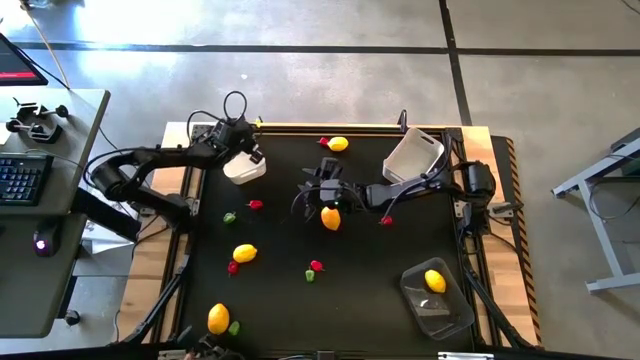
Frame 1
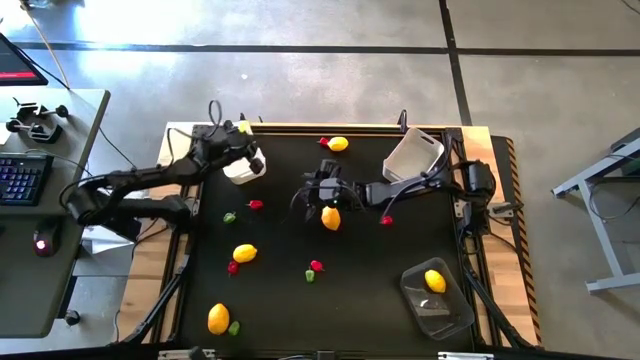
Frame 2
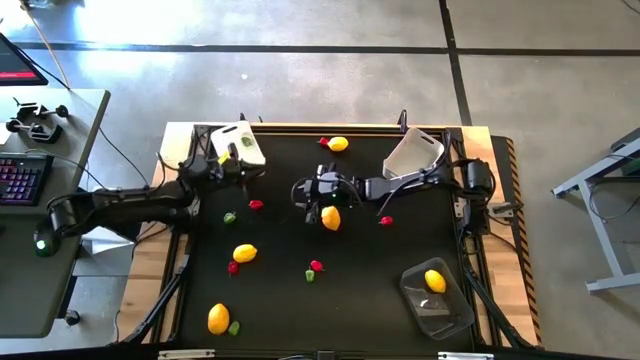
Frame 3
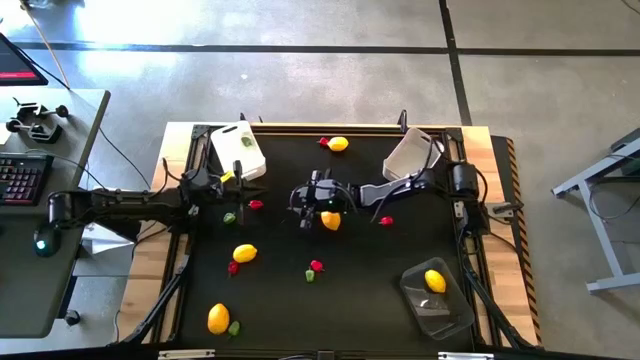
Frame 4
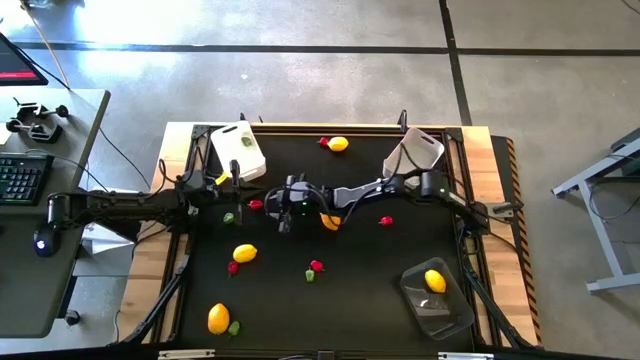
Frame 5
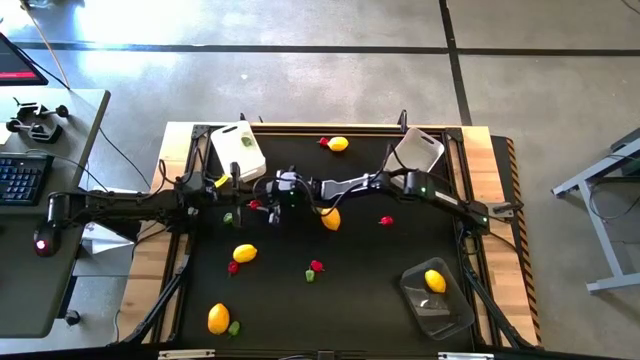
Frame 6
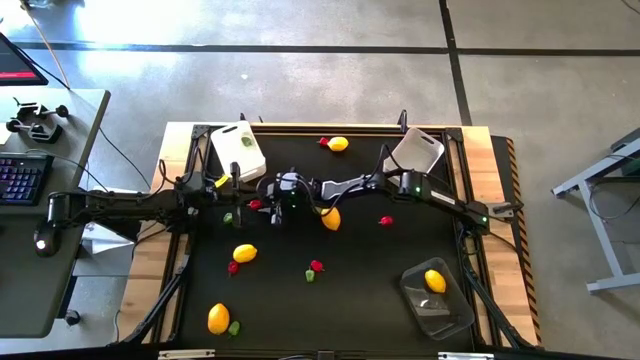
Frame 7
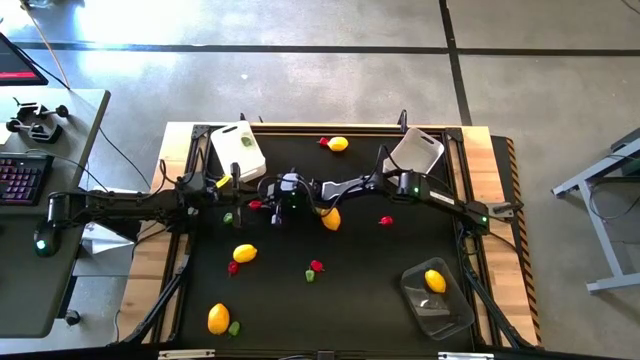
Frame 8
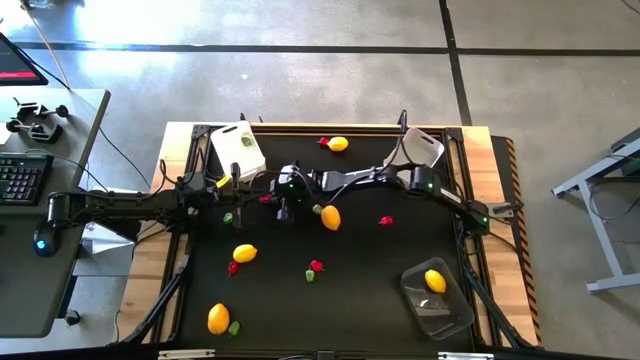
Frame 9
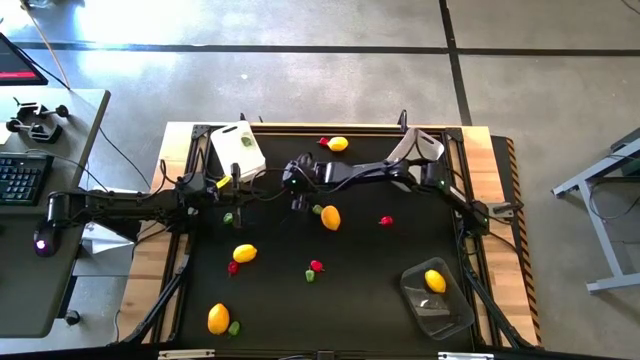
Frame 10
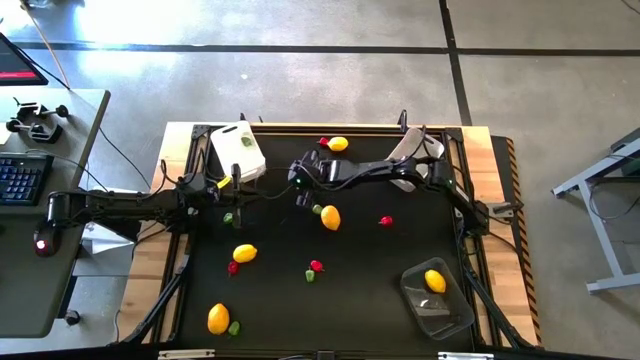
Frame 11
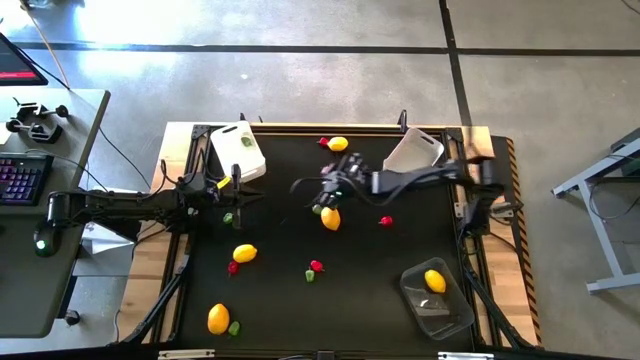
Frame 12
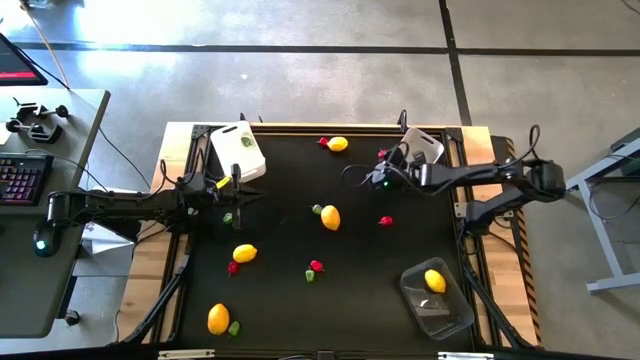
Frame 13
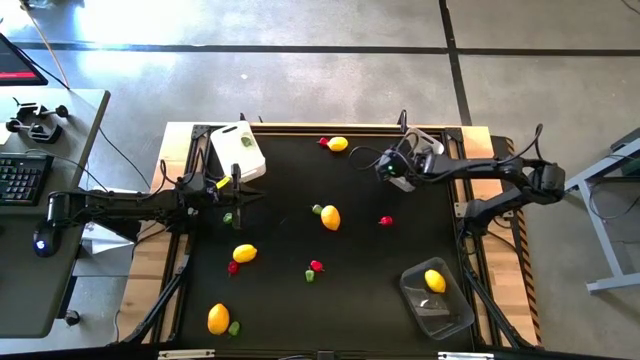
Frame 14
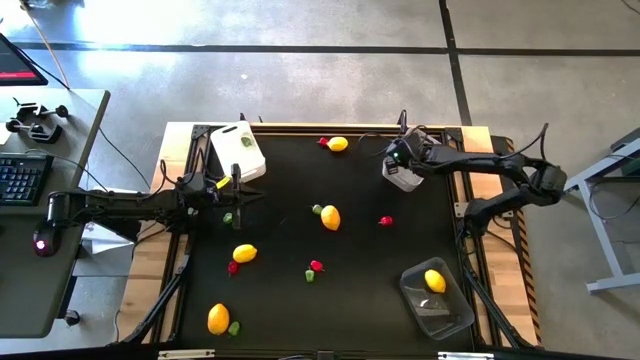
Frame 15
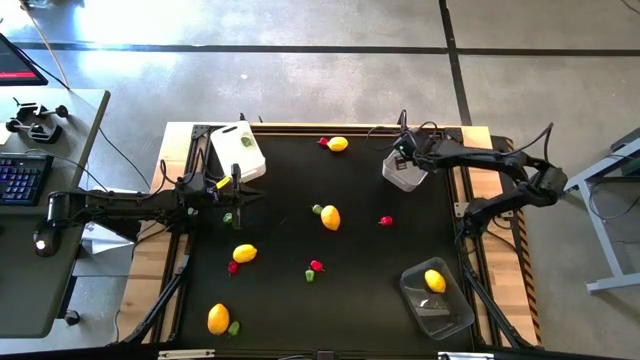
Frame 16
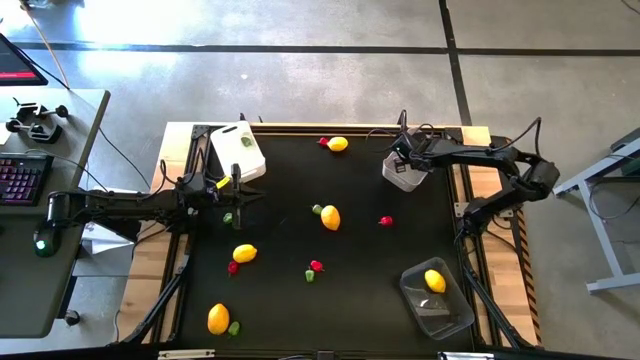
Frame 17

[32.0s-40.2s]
Task: Sort produce into baskets
Put the red chili pepper into the gray bin

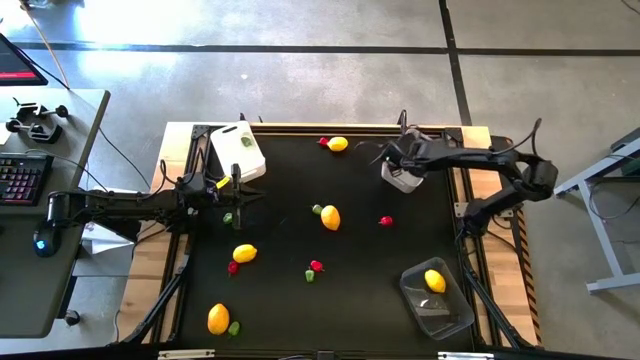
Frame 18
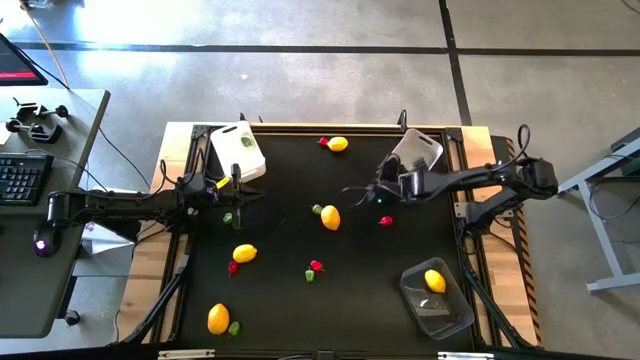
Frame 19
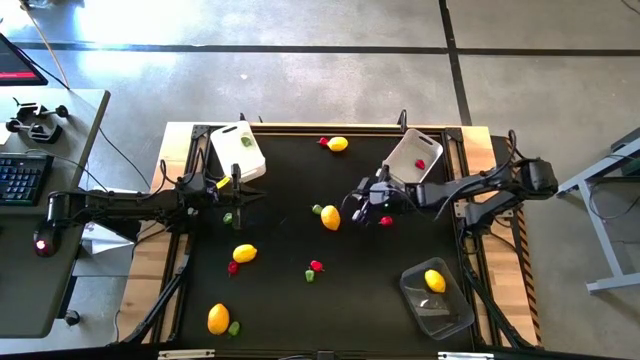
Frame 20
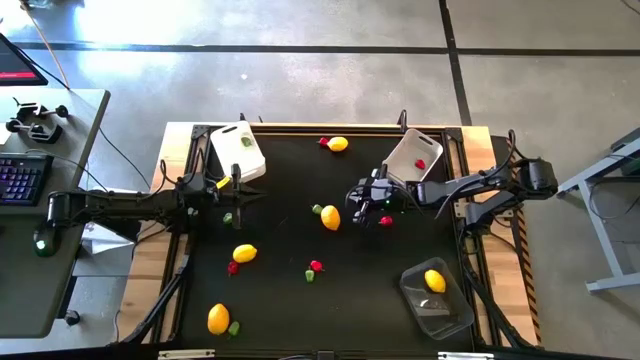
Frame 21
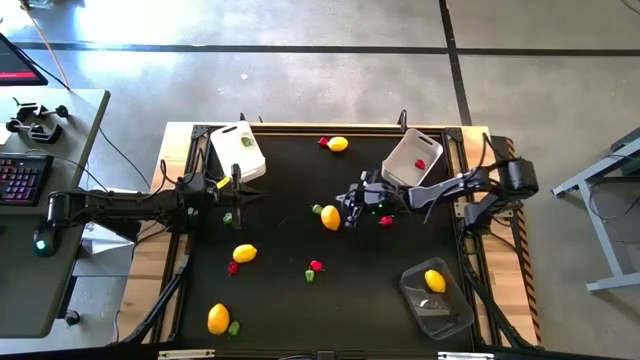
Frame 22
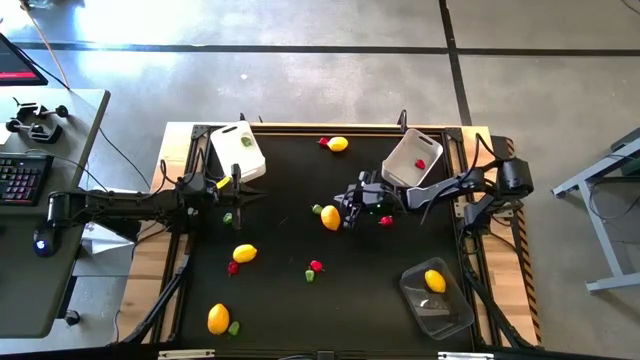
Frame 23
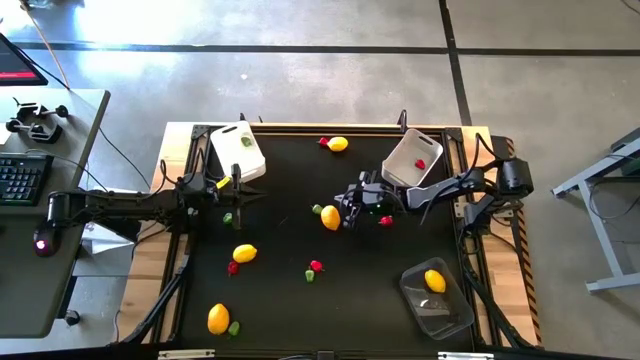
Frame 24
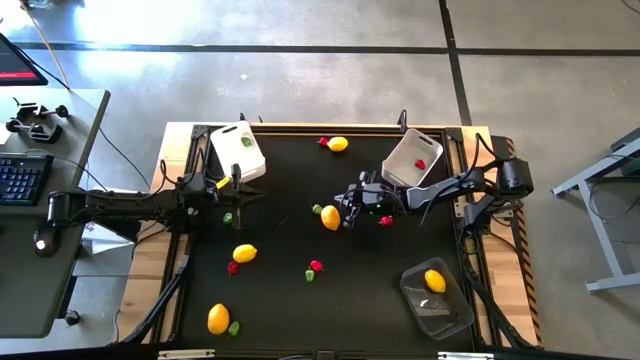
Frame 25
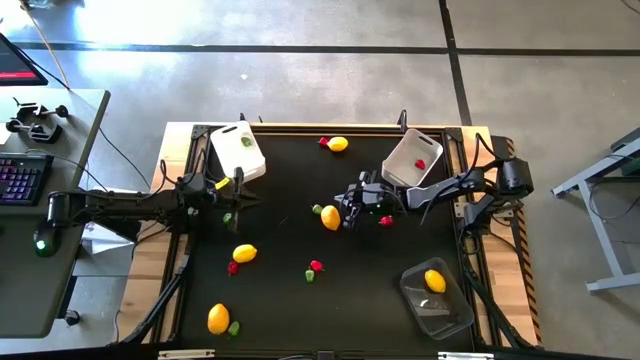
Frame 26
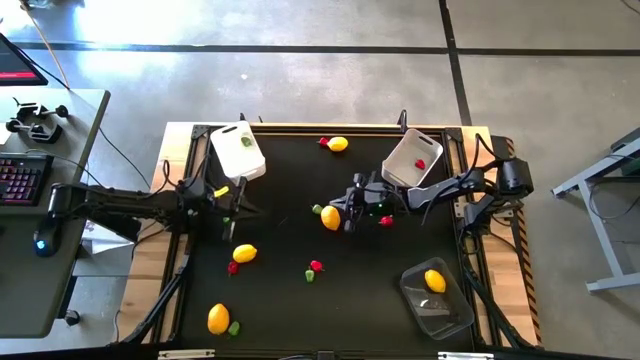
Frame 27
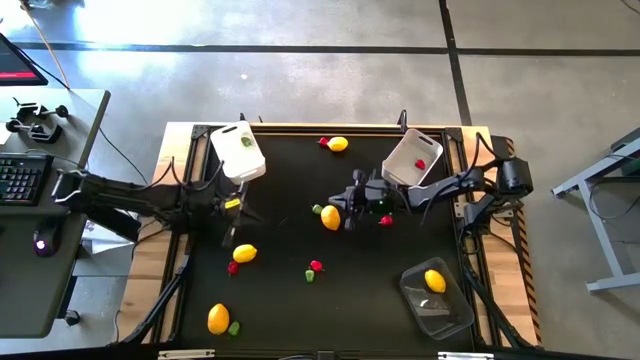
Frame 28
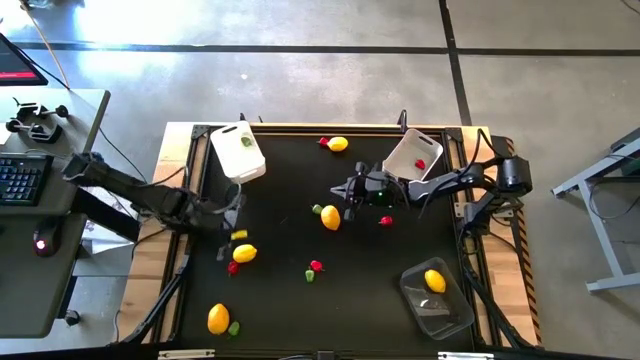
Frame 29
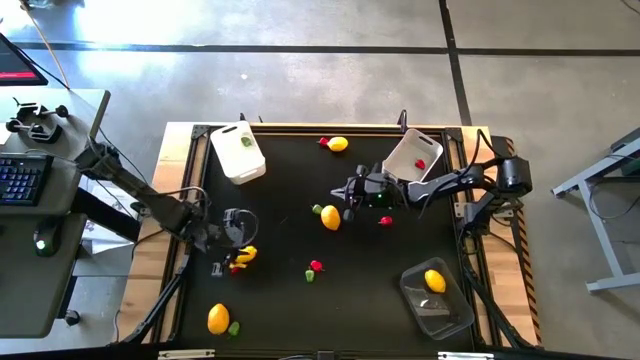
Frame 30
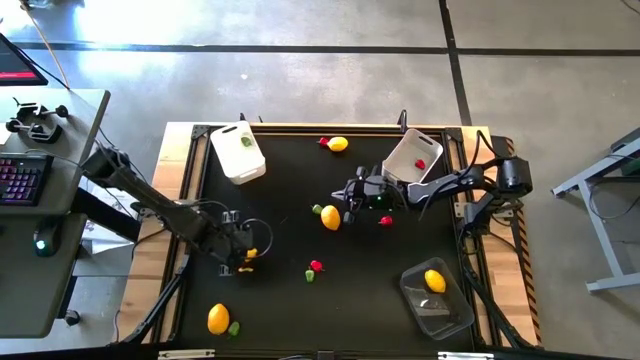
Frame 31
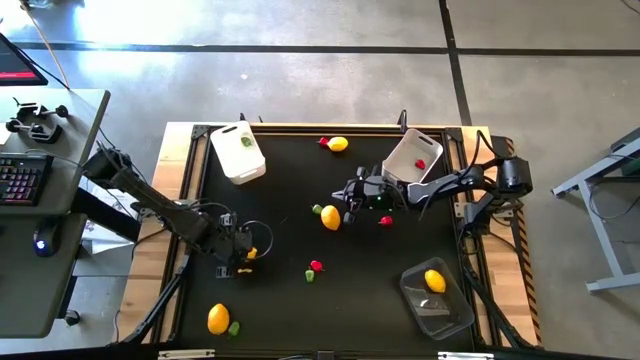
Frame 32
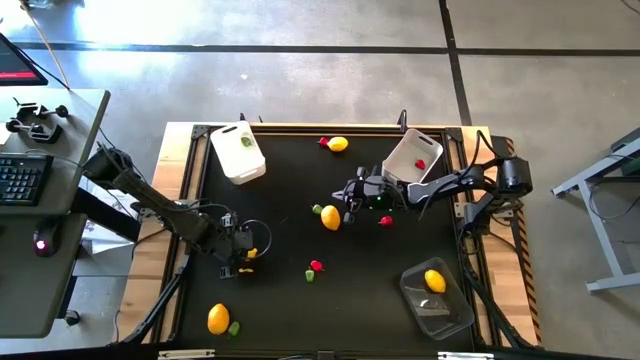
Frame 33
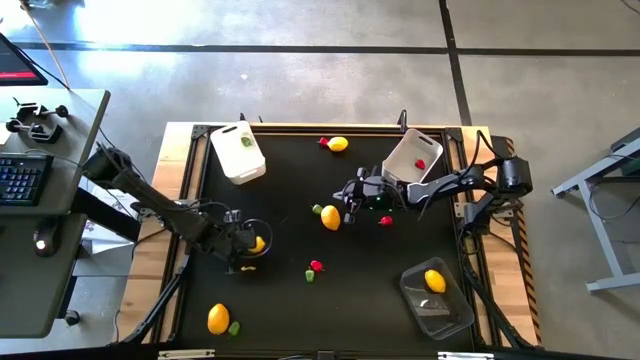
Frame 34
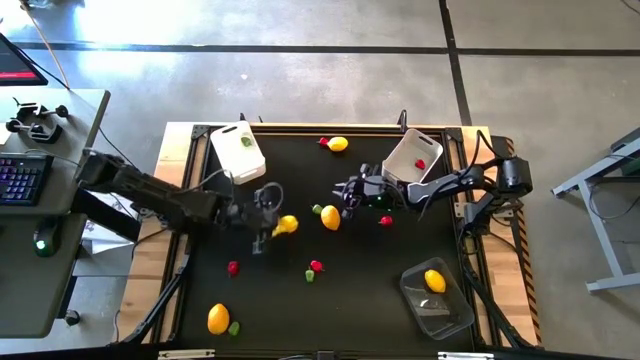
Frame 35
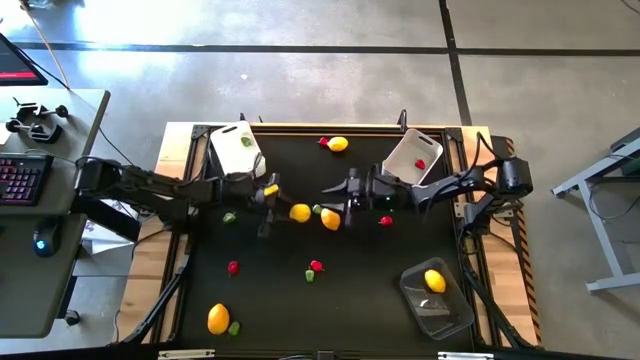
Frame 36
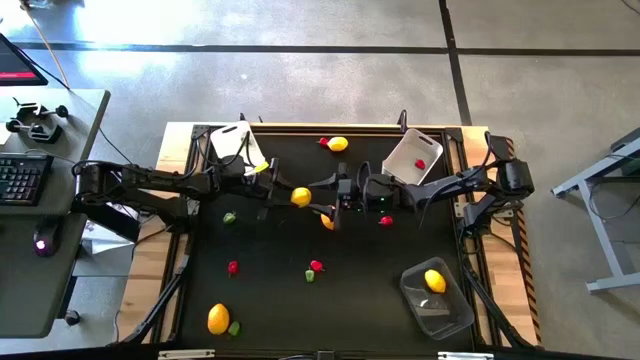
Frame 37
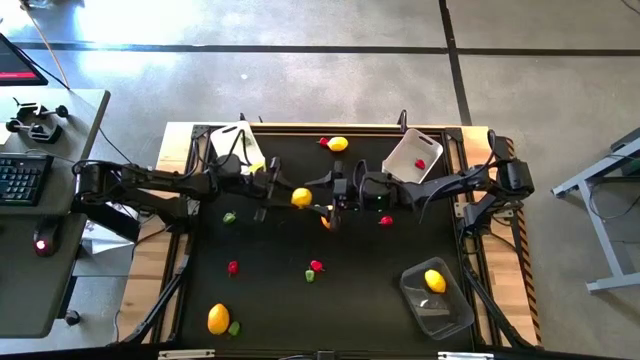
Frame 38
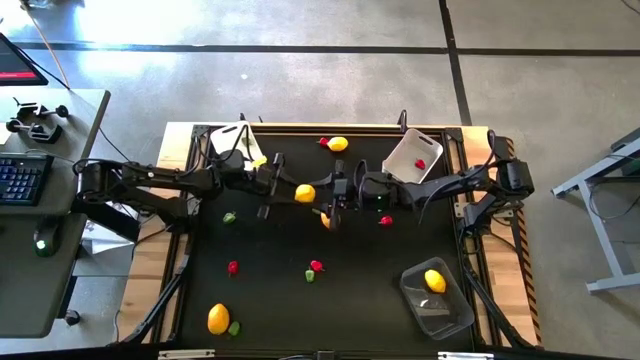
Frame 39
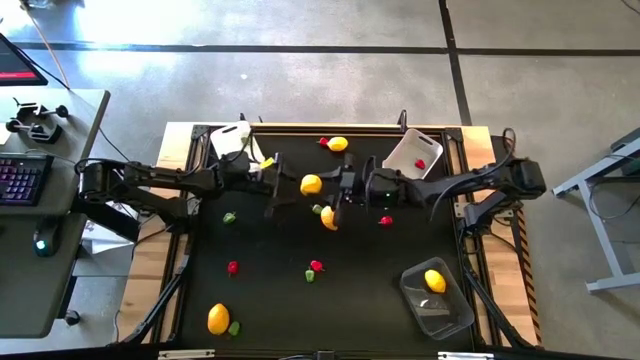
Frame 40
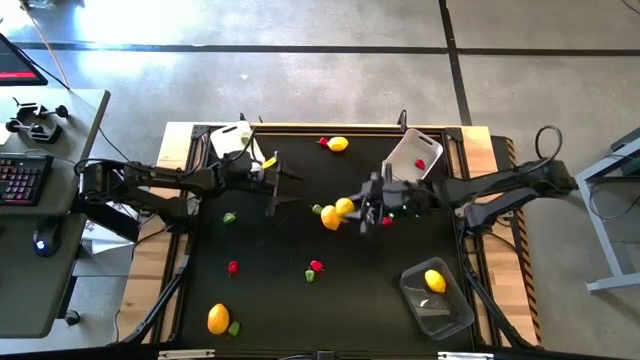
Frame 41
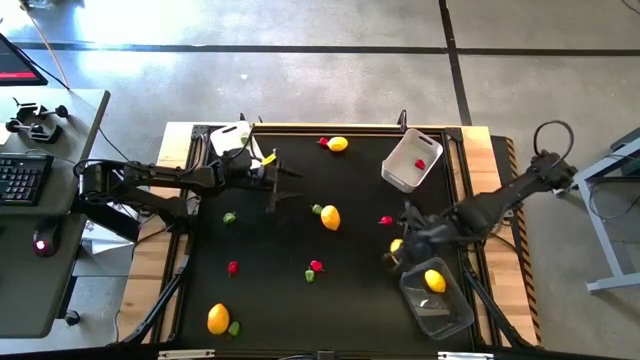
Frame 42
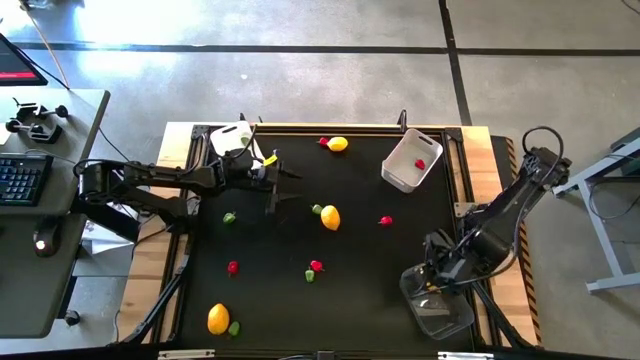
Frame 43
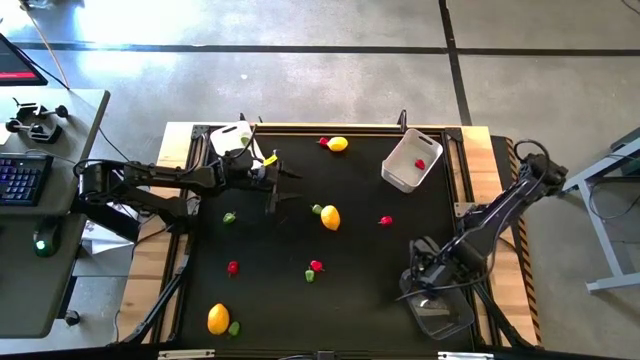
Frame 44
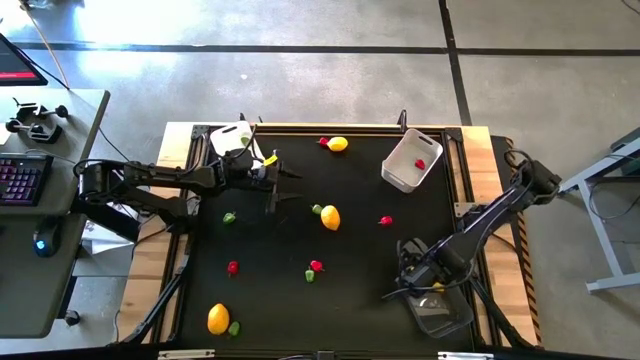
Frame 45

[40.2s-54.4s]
Put the yellow lemon into the transparent bin

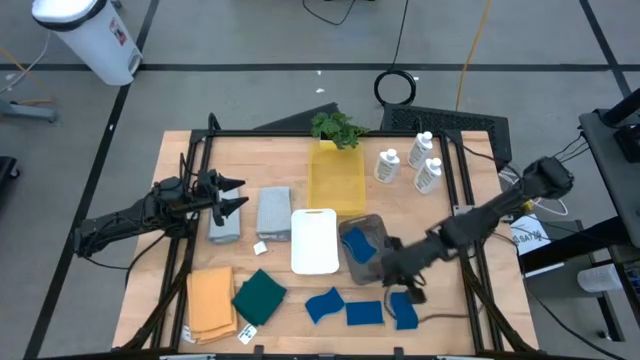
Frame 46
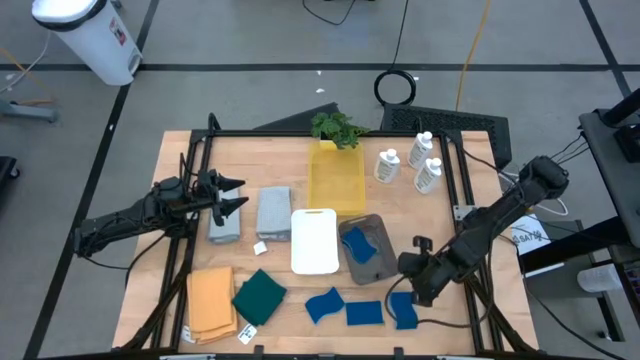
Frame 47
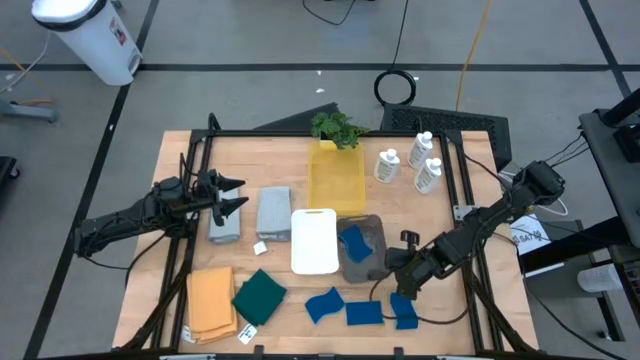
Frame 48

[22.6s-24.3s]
Task: Pick & Place Kitchen Items
Adjust the black bin on the table
